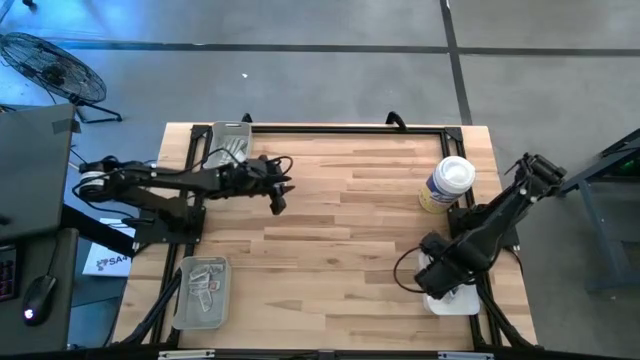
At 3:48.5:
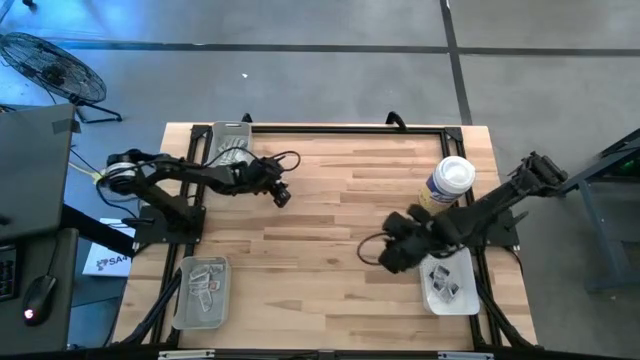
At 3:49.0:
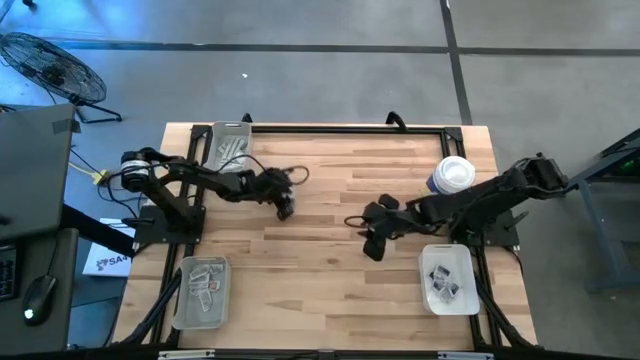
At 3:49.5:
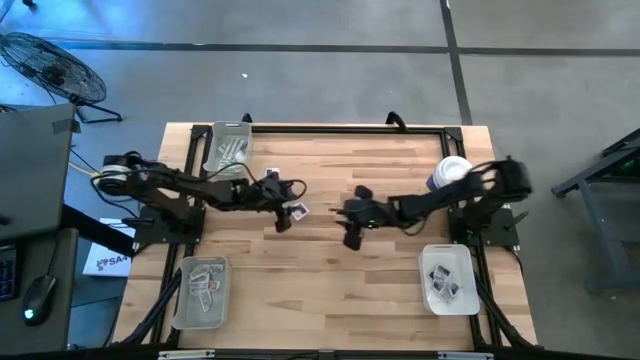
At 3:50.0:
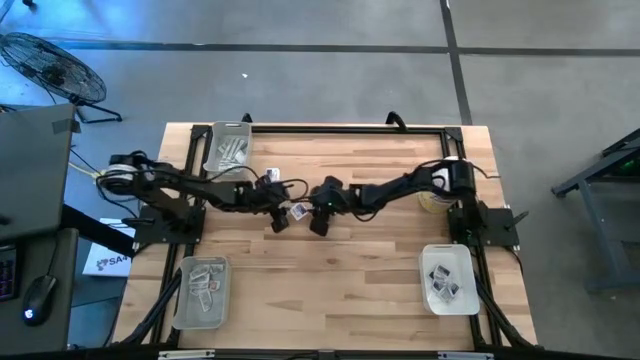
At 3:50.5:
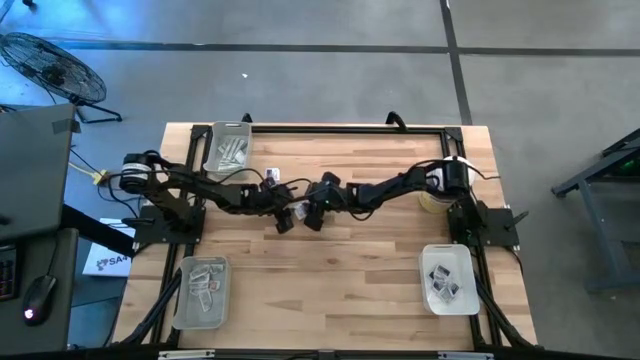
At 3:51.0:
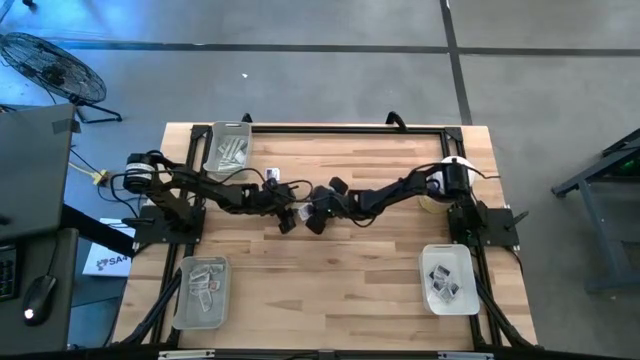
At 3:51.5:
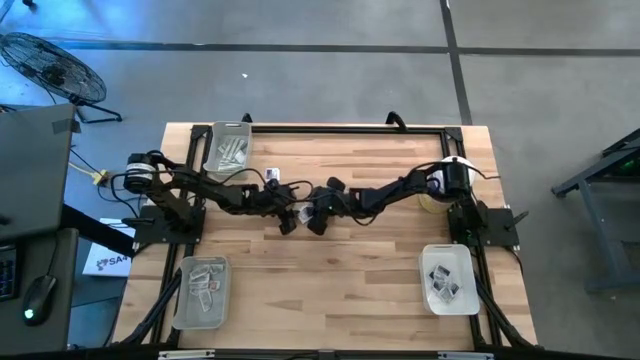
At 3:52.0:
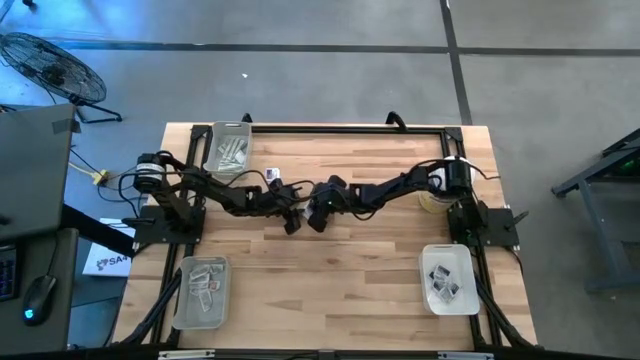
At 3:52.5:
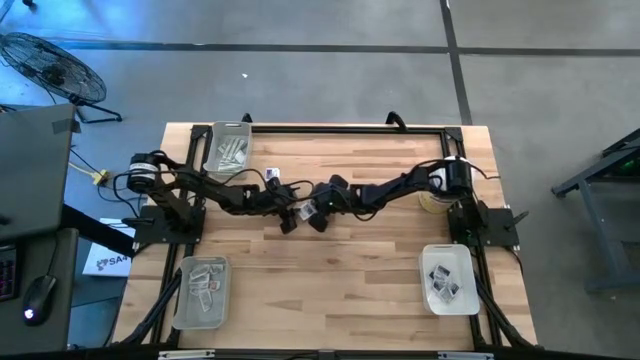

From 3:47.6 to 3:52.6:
Task: Pick & Place First Aid Supplies
Put the bottom blue alcohol pad into the white bin

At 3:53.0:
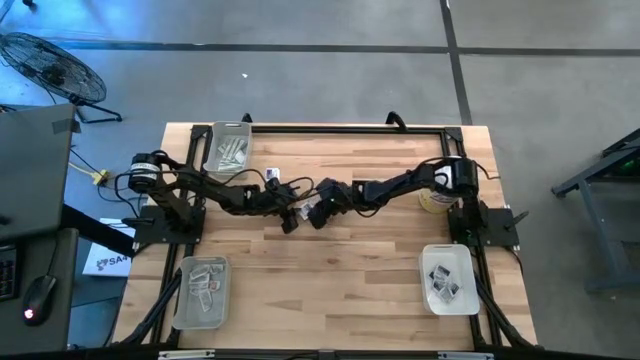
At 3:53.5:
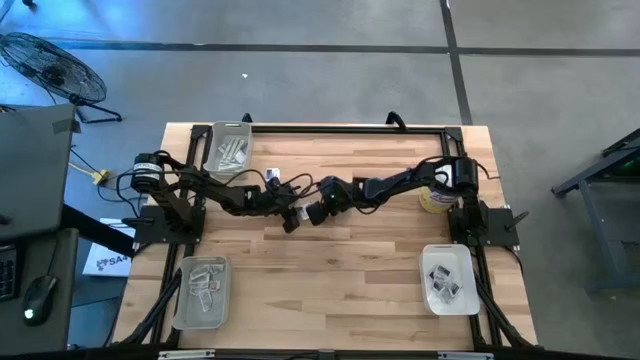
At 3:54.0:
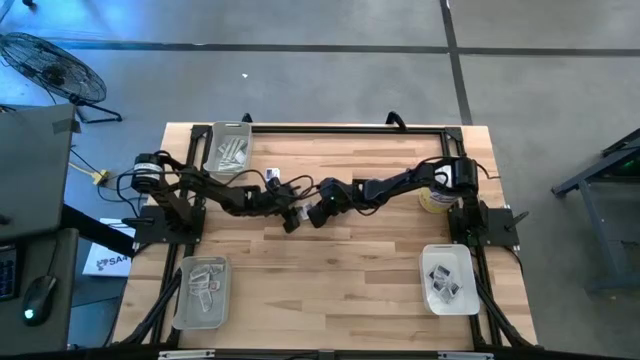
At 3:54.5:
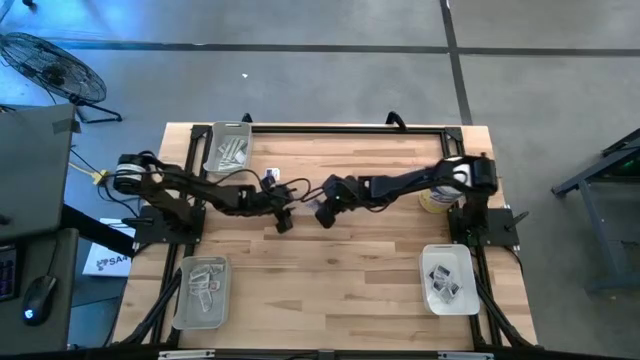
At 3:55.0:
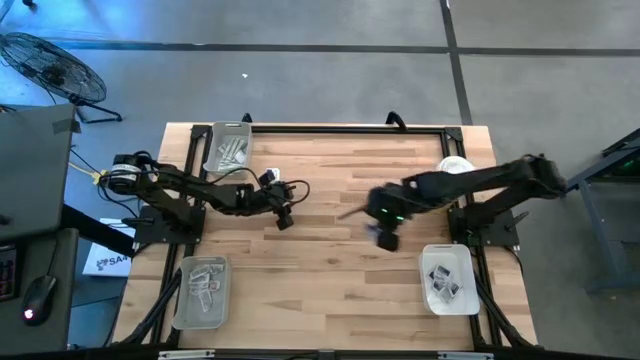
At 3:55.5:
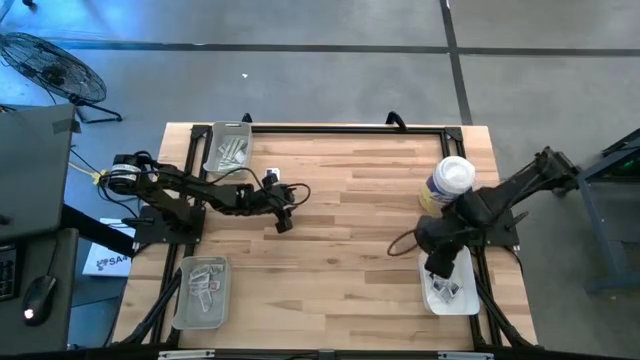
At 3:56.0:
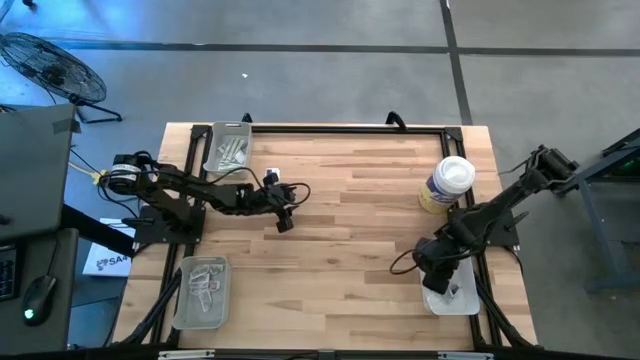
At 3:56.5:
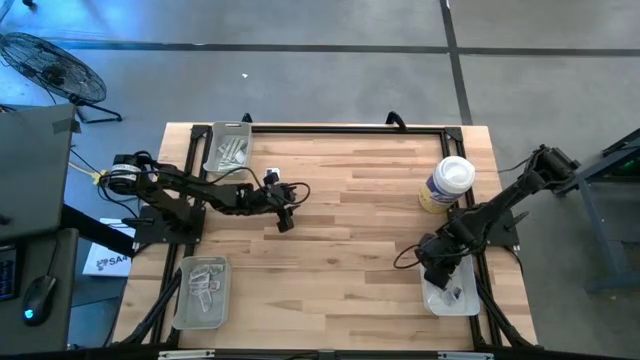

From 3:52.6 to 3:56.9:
Put the bottom blue alcohol pad into the white bin

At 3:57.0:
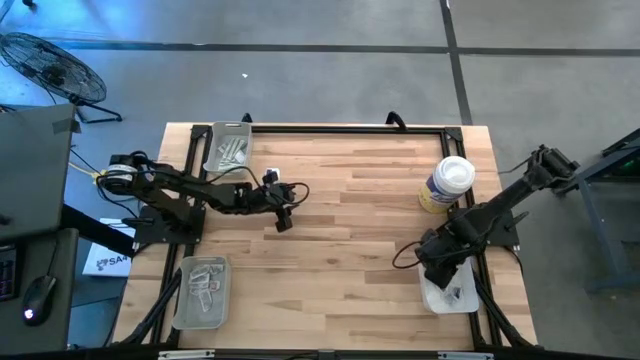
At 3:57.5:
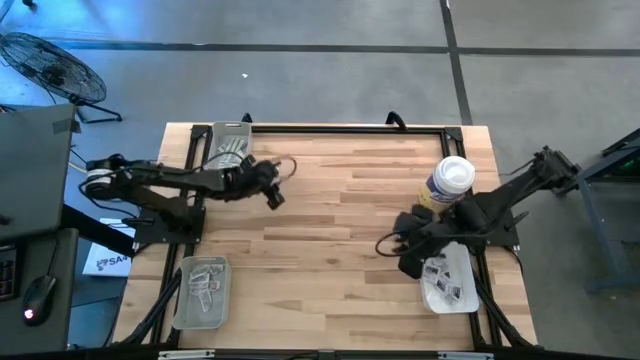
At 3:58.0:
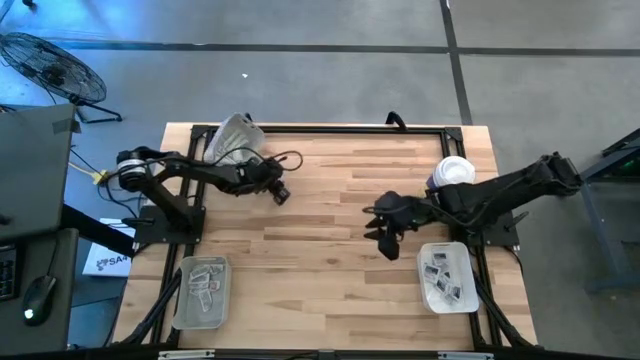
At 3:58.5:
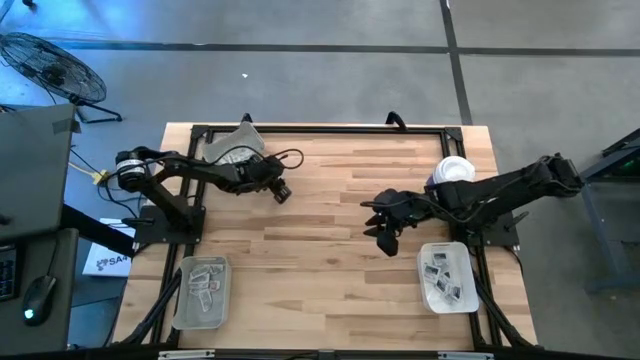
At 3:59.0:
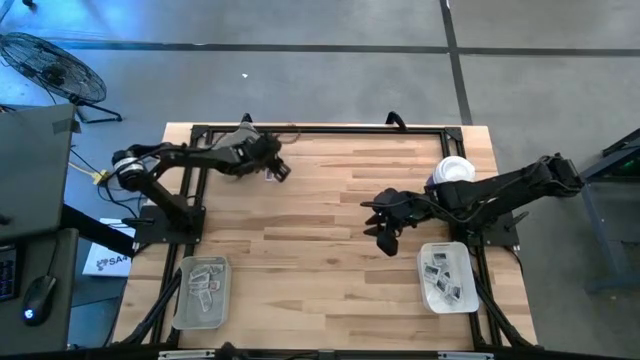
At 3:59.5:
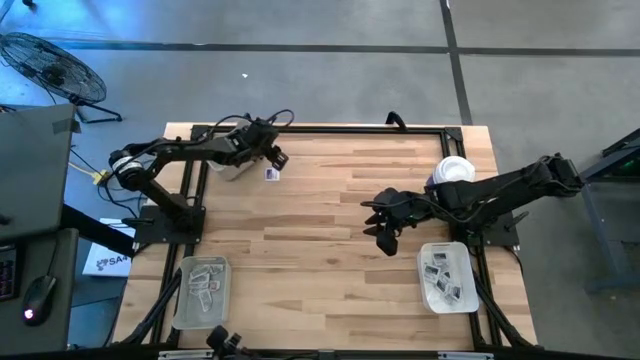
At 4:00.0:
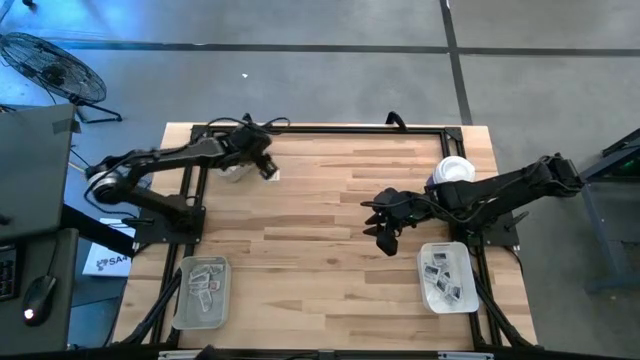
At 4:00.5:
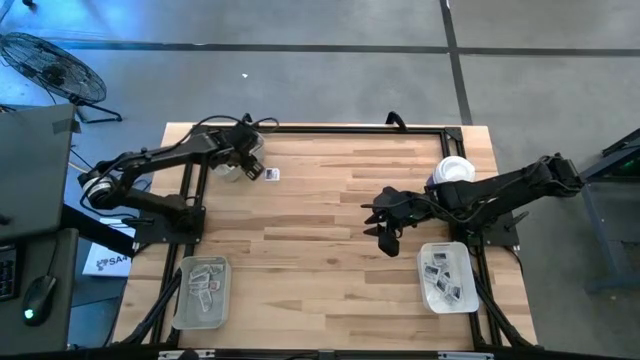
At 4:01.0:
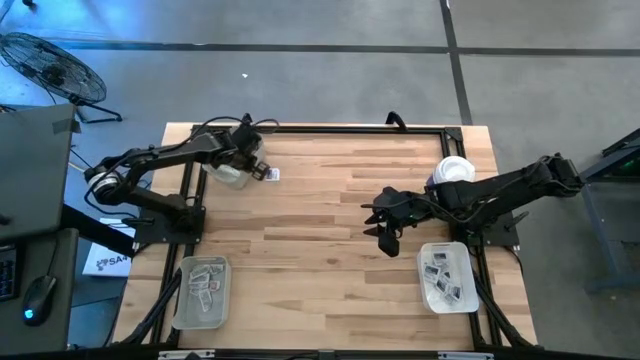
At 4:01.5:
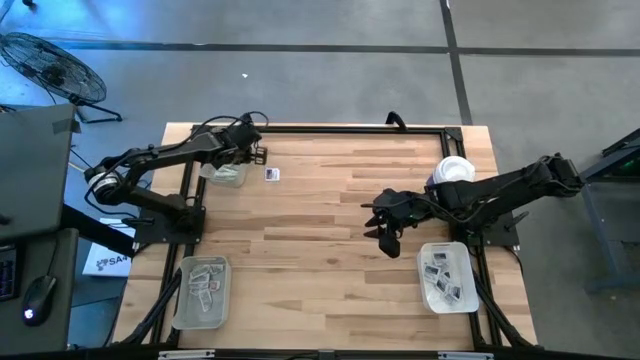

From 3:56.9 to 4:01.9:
Adjust the top gray bin on the table

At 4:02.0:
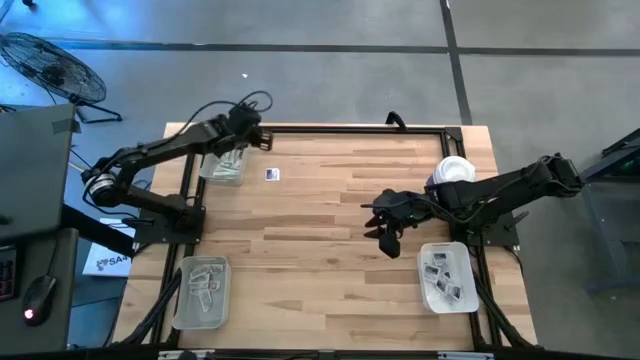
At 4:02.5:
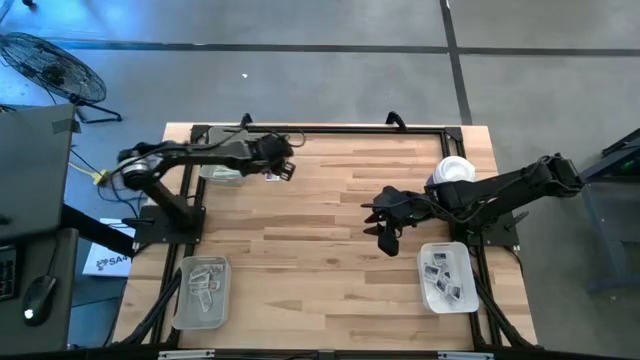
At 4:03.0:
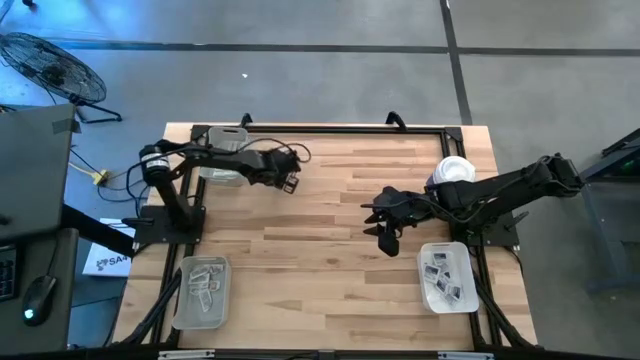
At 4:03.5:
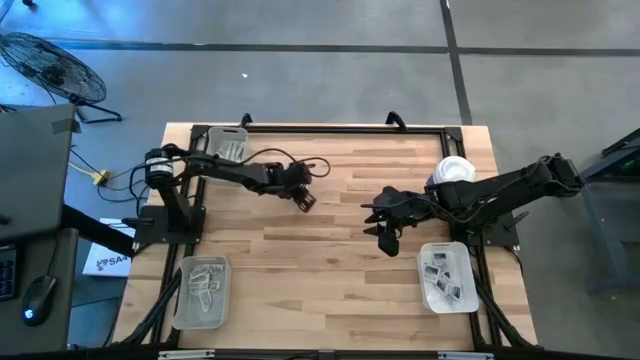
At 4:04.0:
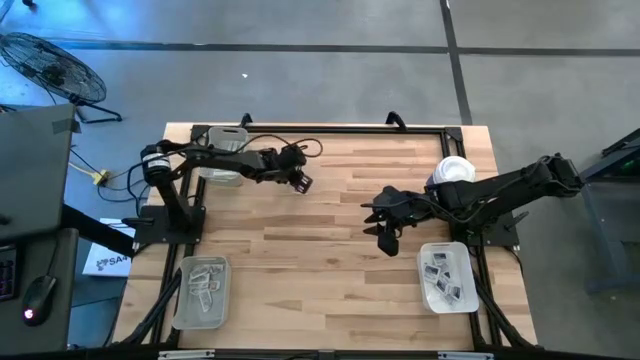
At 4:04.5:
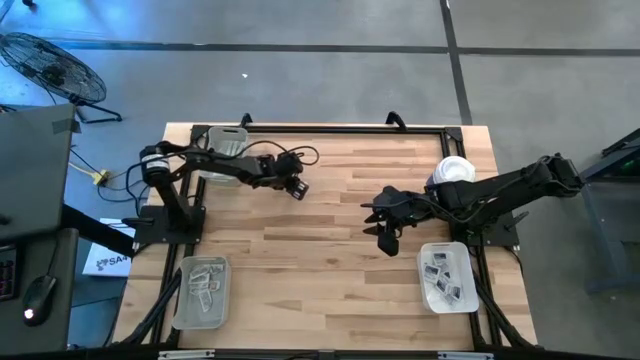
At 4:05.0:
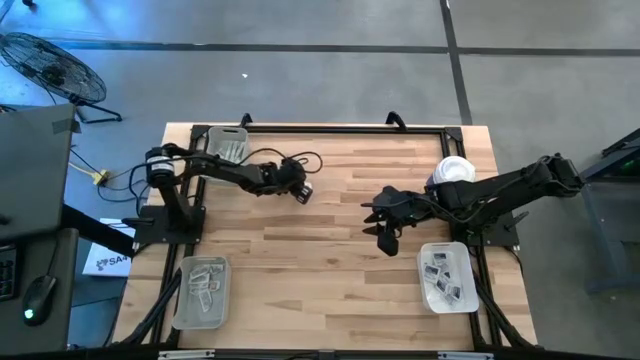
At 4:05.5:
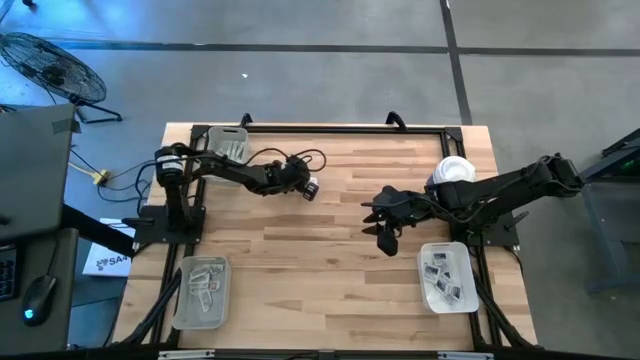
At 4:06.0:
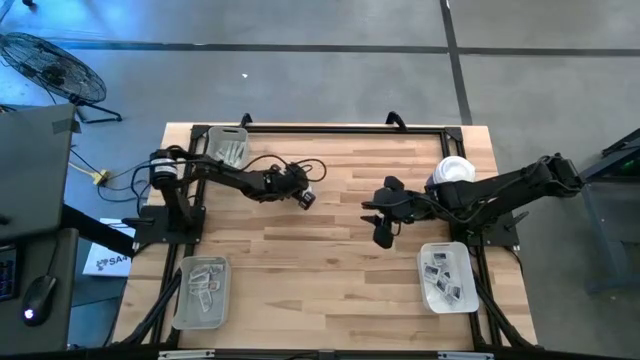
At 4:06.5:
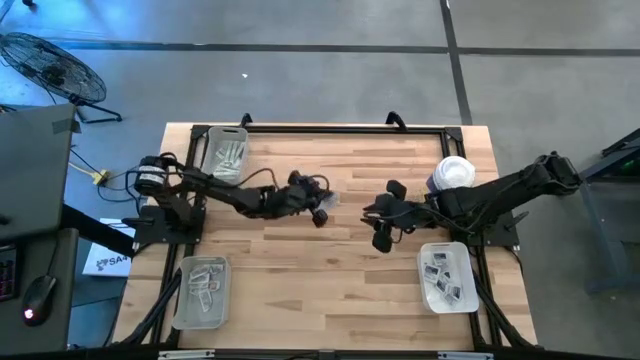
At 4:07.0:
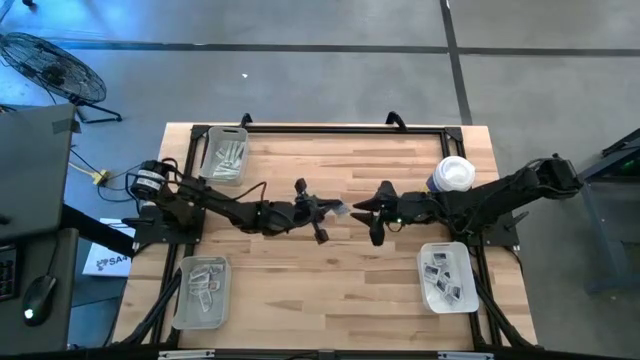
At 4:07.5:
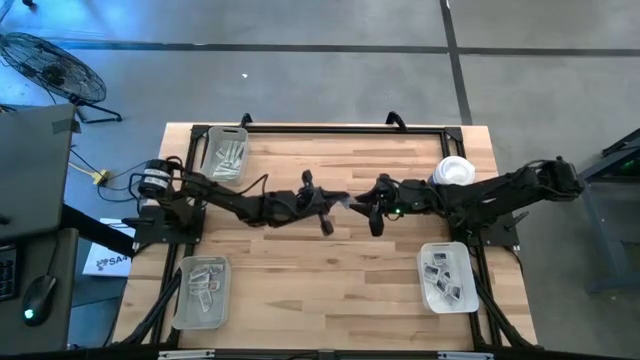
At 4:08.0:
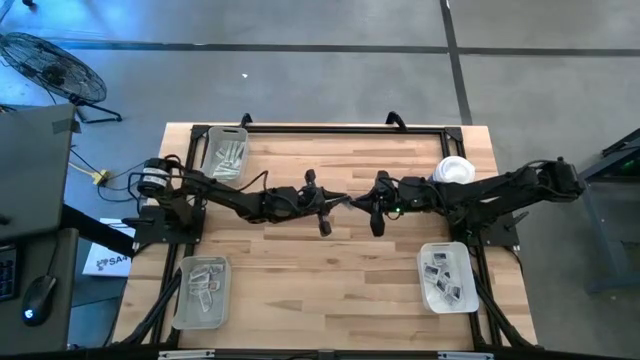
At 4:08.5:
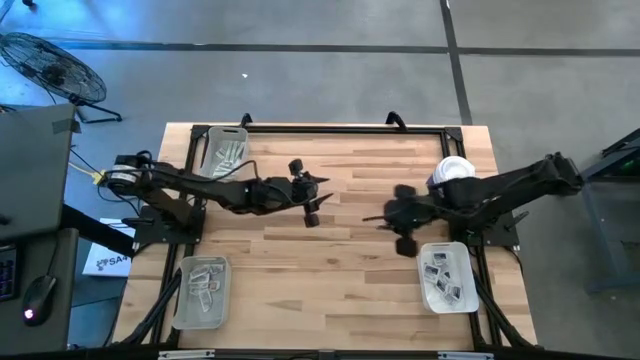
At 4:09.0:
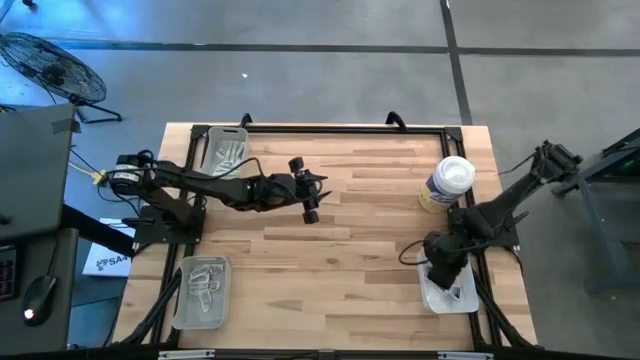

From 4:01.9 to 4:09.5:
Put the blue alcohol pad into the white bin
